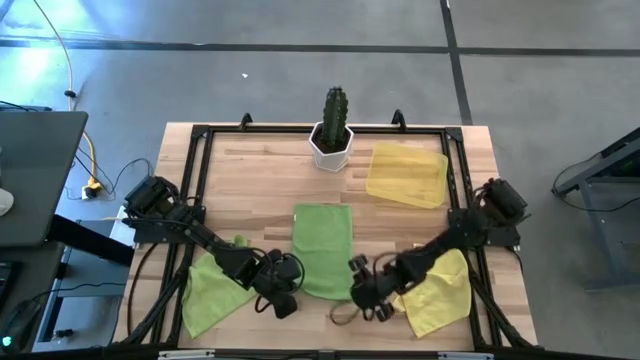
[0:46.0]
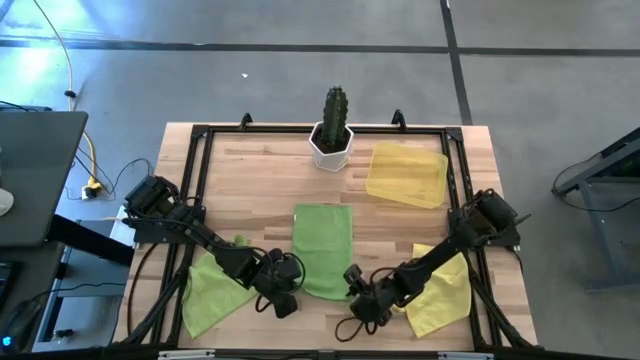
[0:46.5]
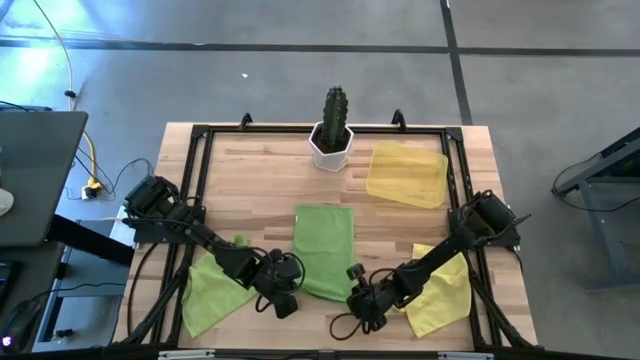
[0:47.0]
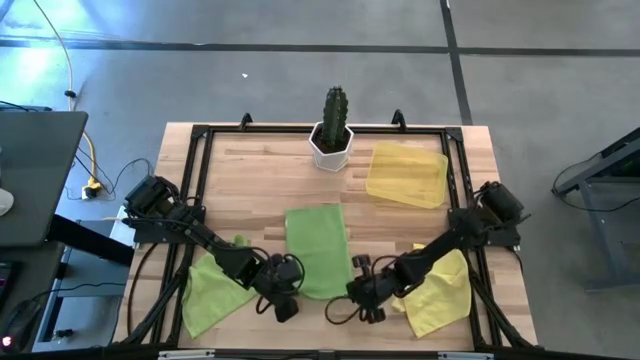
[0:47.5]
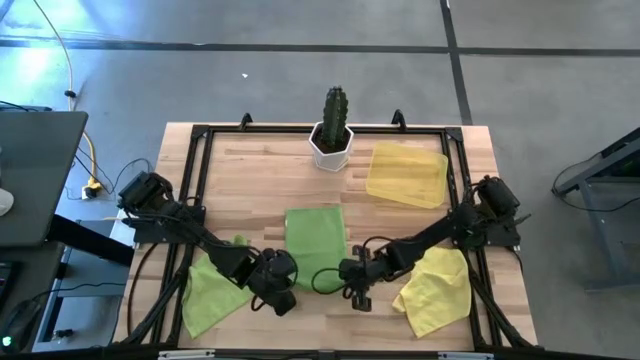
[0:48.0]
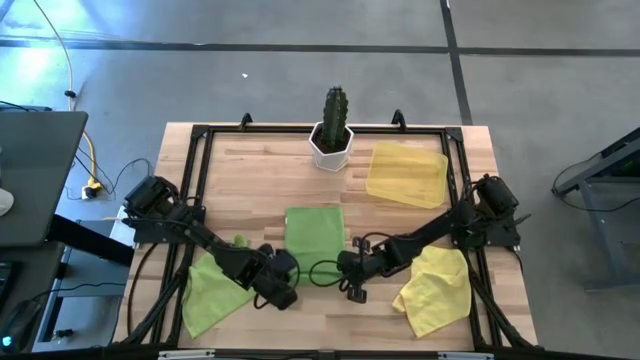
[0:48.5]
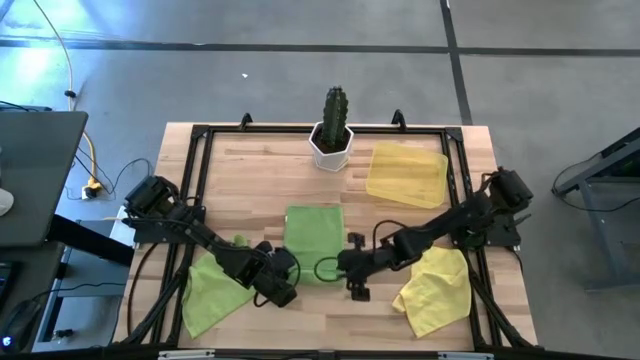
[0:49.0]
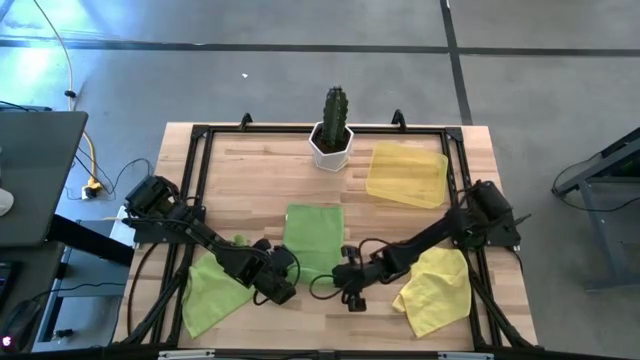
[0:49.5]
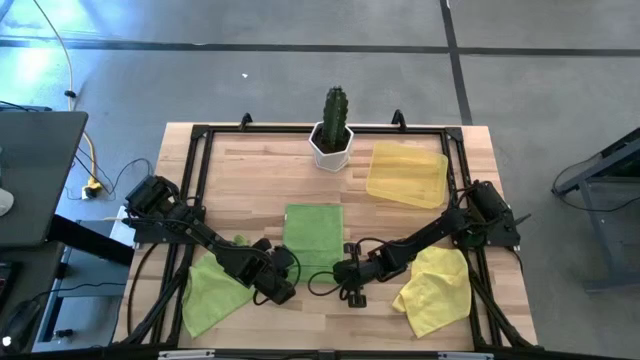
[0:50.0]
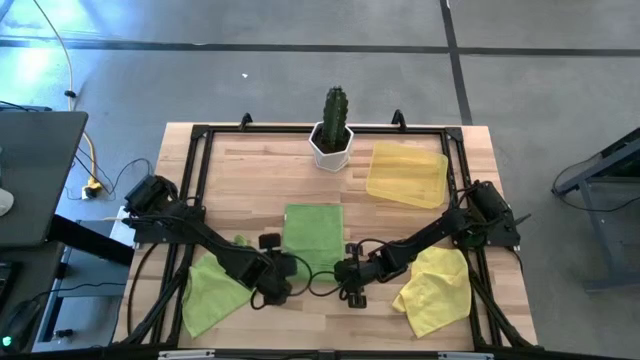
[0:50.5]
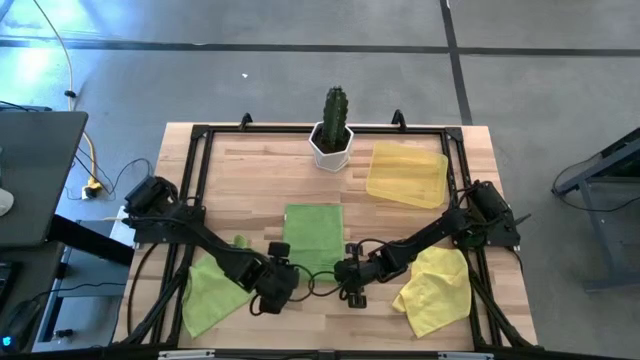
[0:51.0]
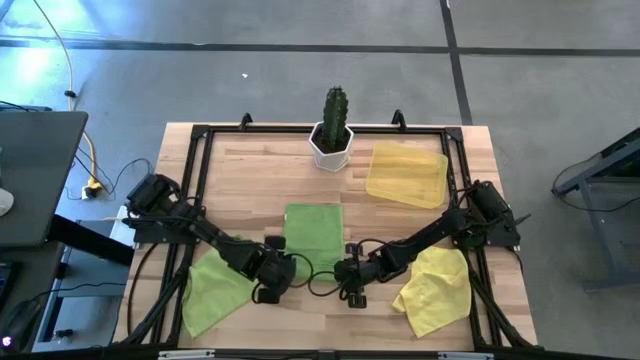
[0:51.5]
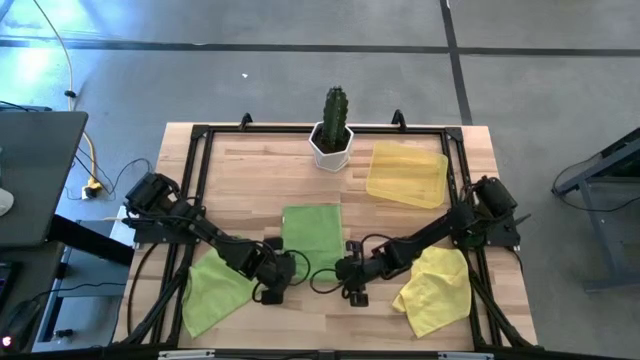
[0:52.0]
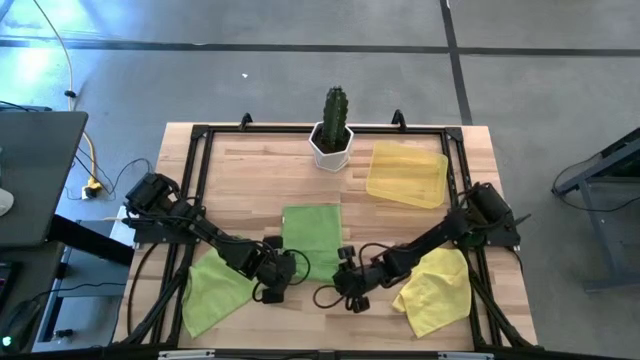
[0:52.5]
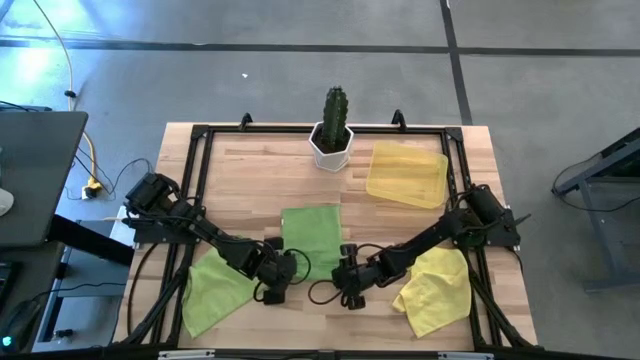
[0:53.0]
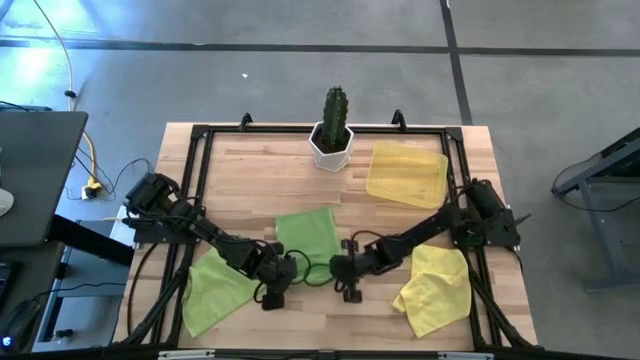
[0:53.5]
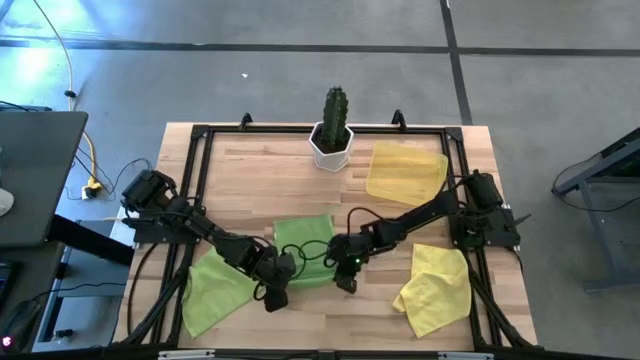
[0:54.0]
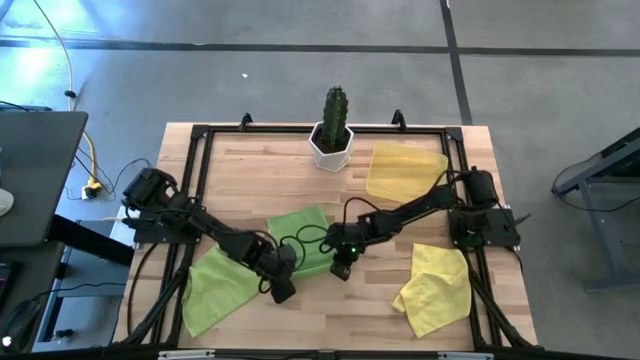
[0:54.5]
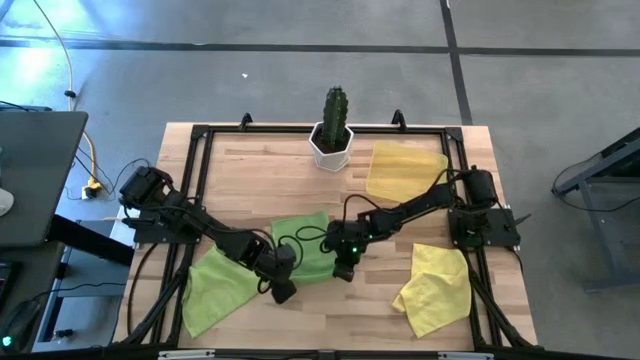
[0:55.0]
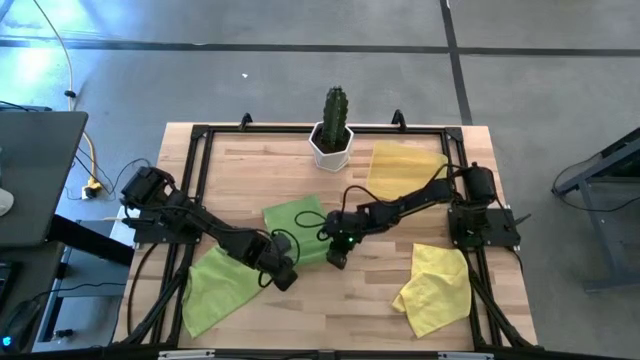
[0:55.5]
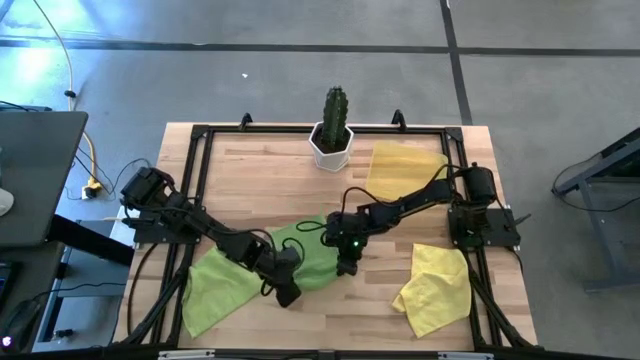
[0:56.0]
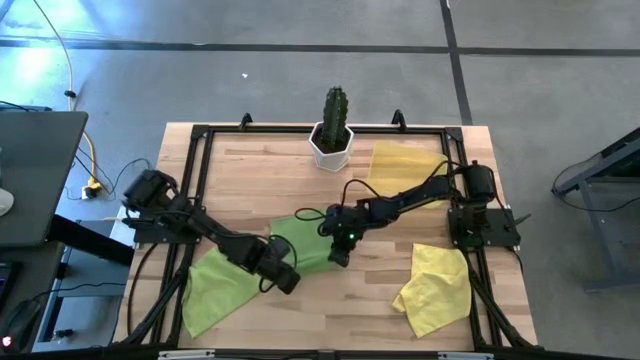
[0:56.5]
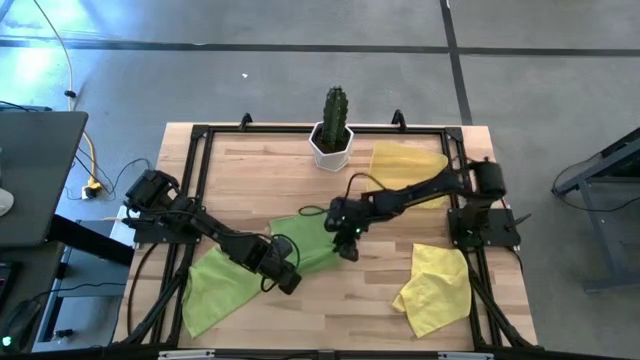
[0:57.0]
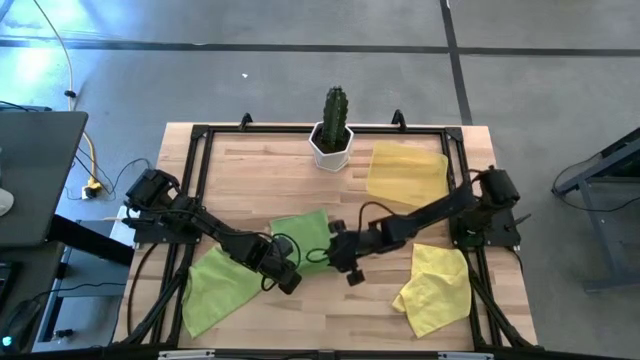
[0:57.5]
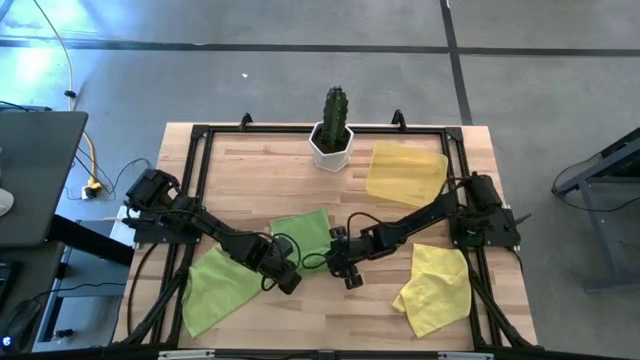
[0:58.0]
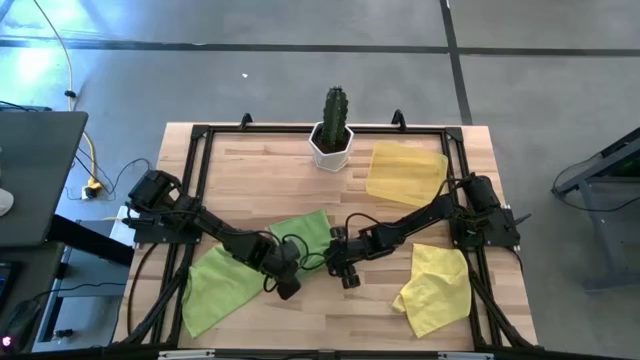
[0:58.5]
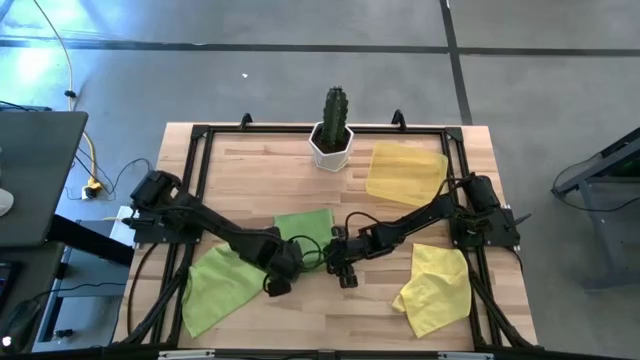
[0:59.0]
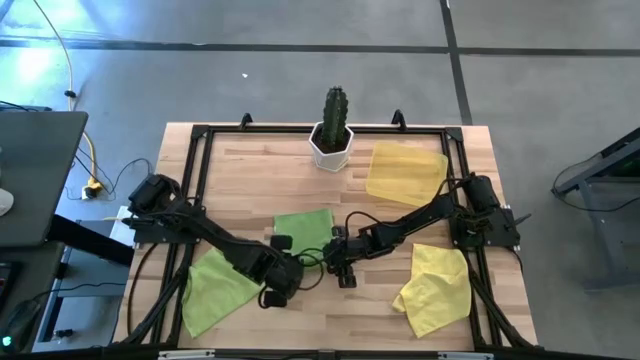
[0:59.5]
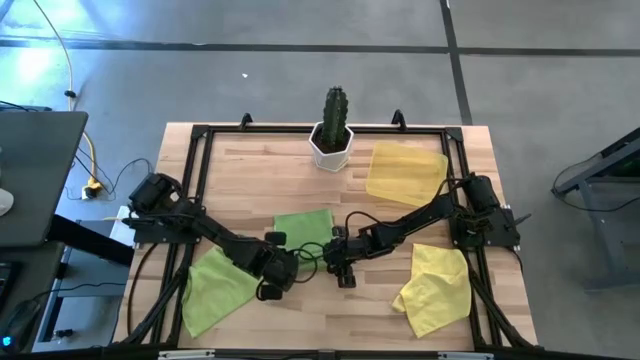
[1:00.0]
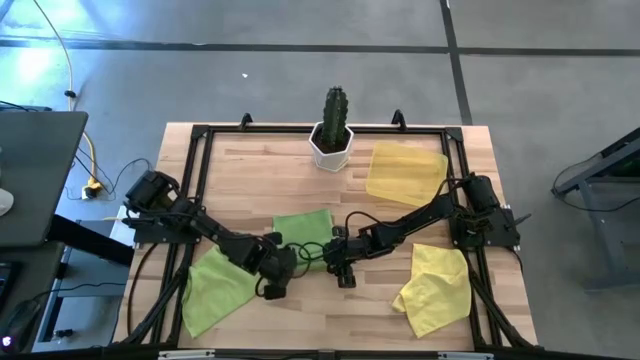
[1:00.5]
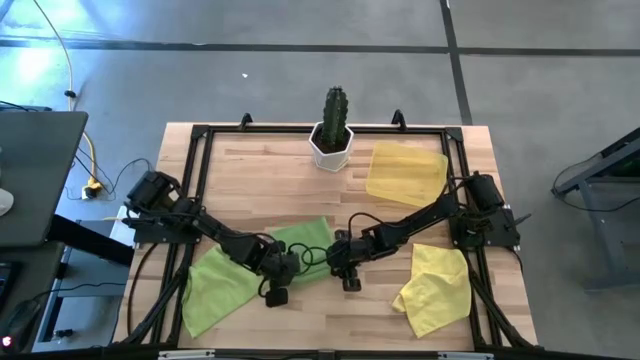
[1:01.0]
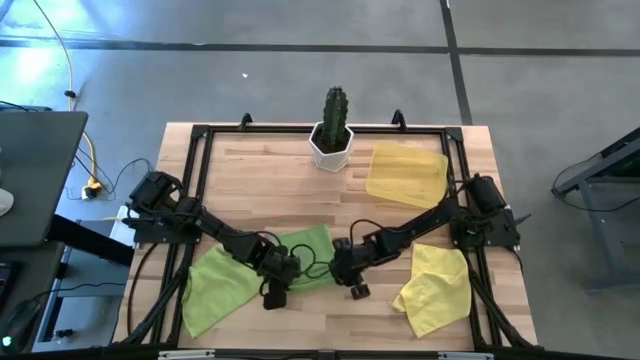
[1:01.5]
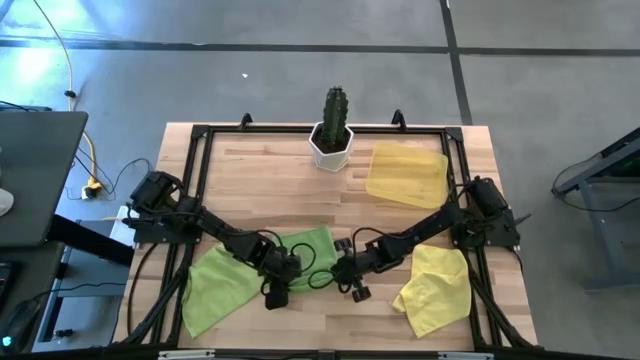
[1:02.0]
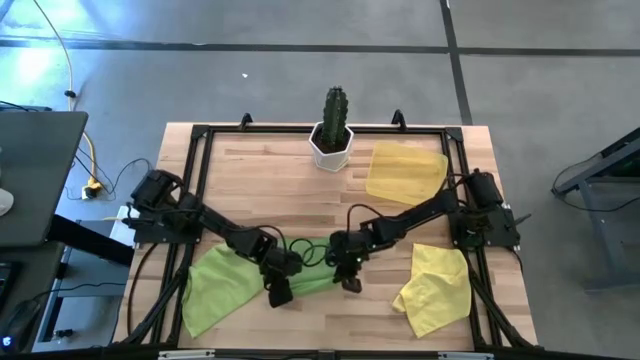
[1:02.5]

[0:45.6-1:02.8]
Task: Roll microfiber towels into tight, uniform cylinder then place into a basket
Roll the green towel

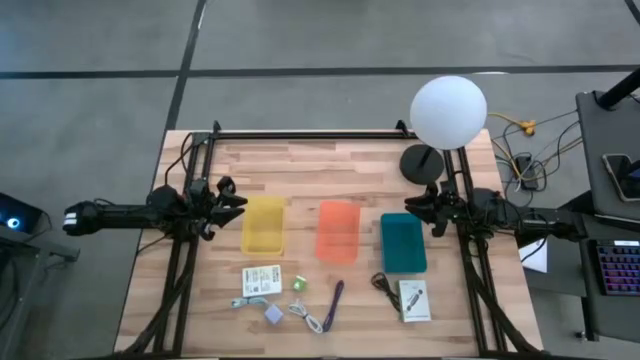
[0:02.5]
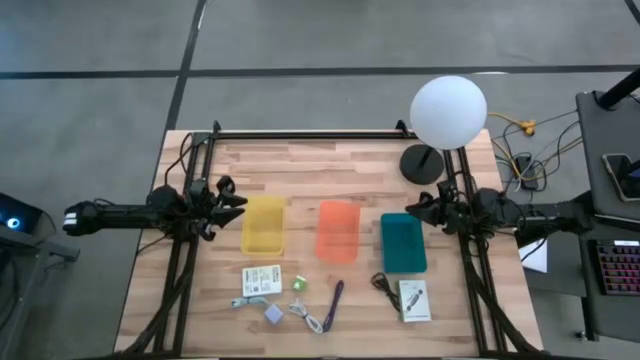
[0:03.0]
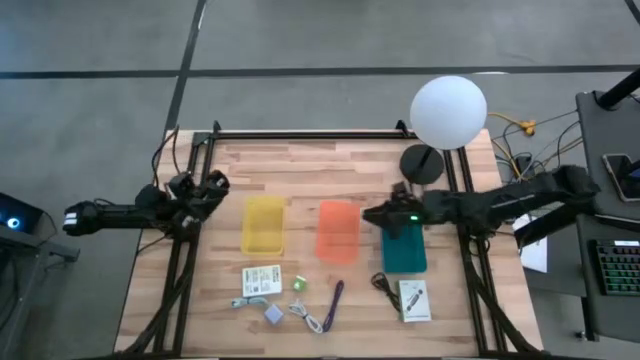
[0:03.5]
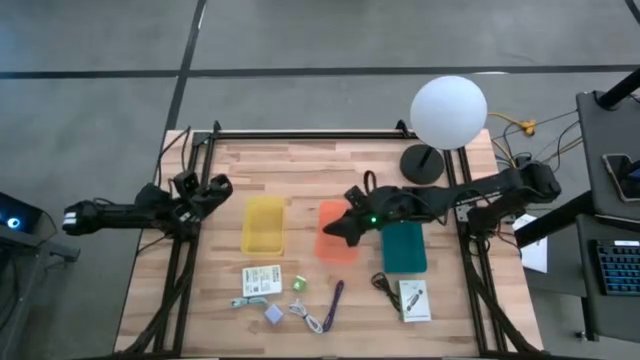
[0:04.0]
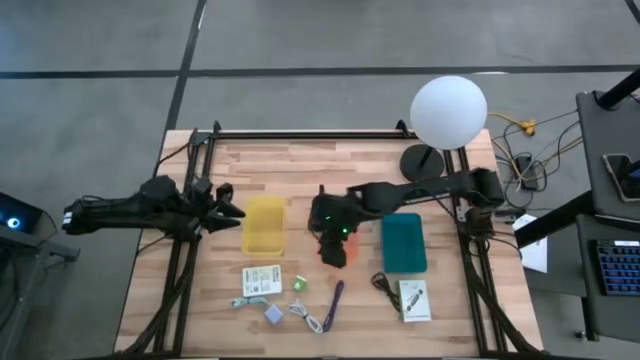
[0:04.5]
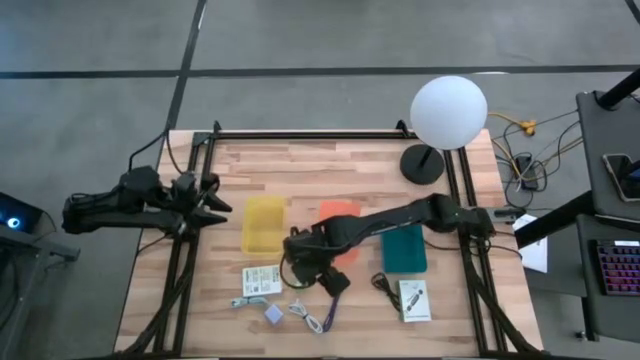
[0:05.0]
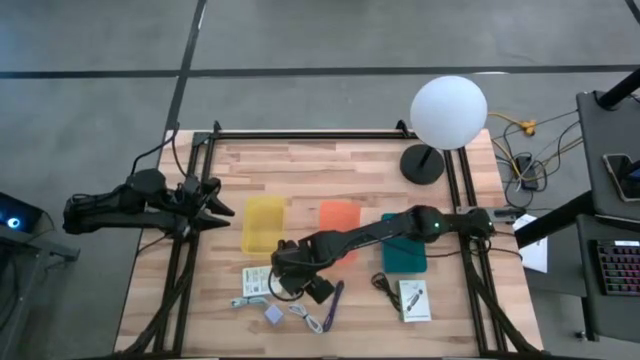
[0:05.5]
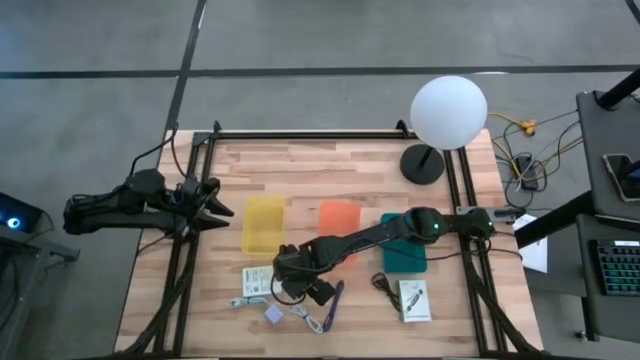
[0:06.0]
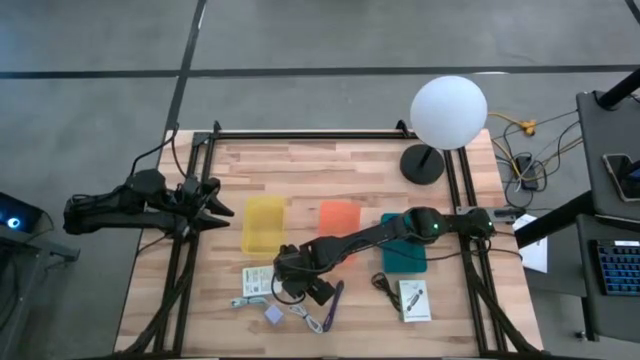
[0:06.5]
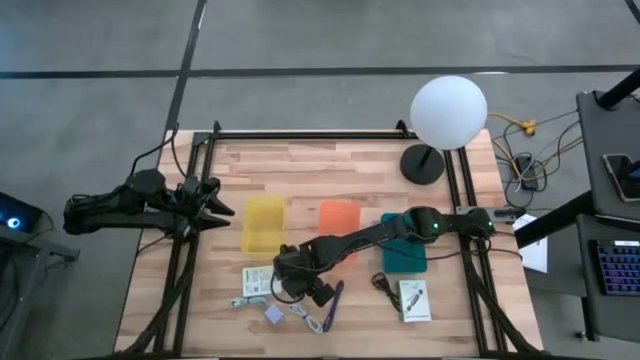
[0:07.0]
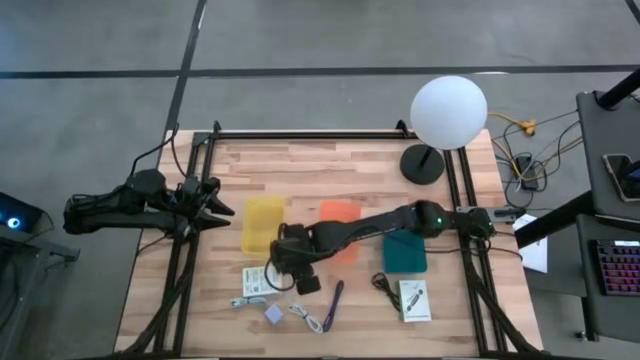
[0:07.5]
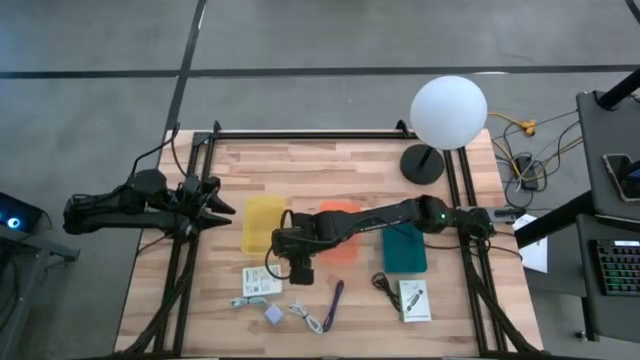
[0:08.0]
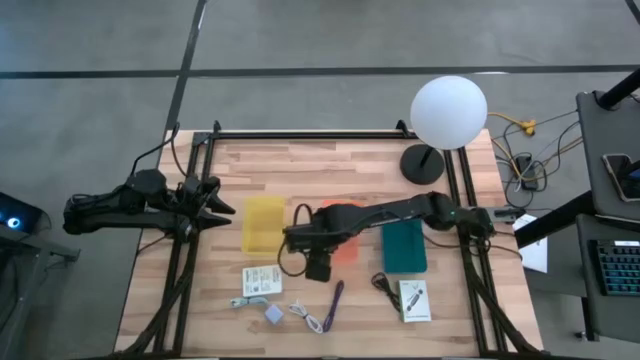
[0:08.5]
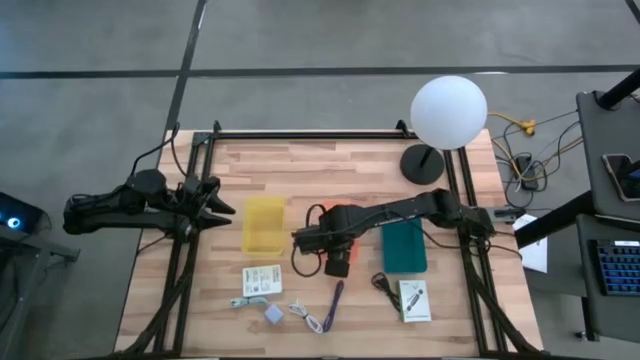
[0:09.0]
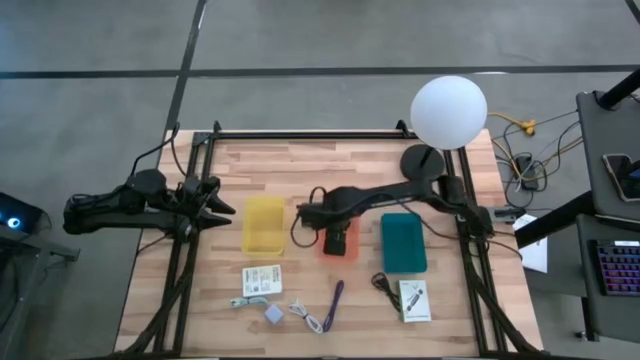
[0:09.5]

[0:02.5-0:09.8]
Task: Pick and place items into bin
Put the green charger adapter into the orange bin
